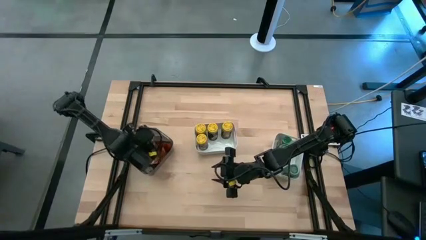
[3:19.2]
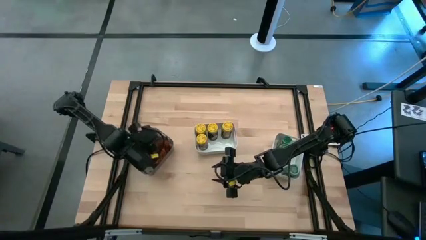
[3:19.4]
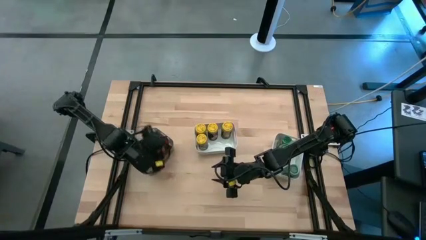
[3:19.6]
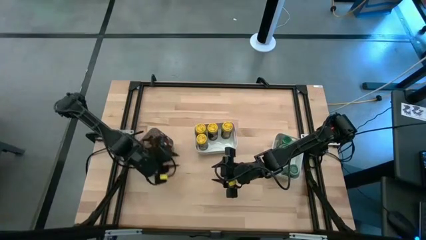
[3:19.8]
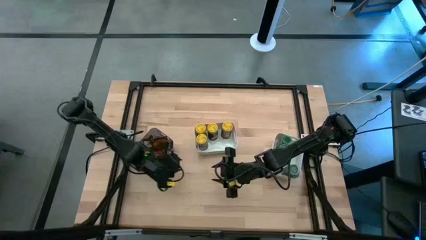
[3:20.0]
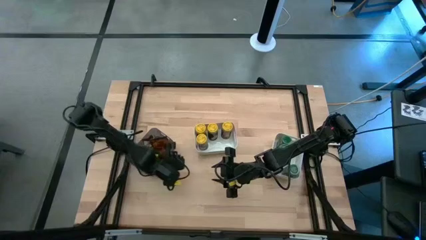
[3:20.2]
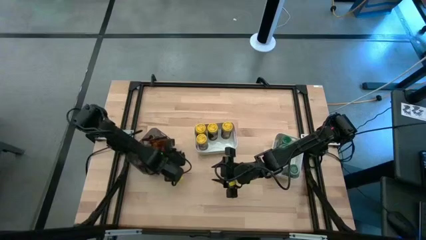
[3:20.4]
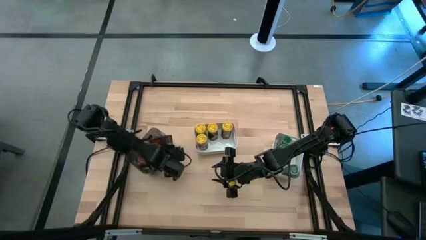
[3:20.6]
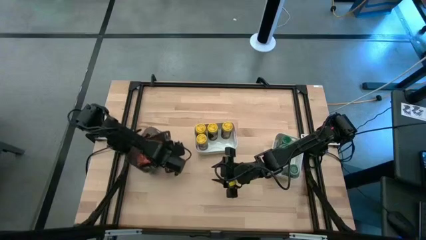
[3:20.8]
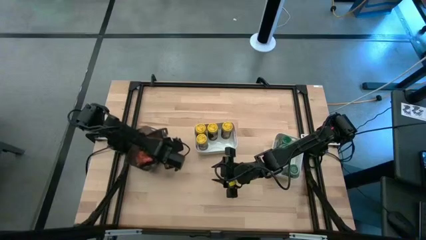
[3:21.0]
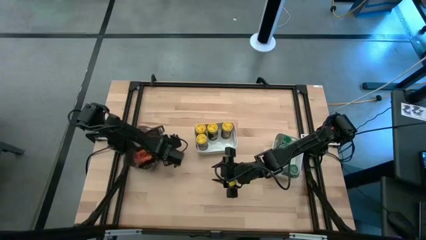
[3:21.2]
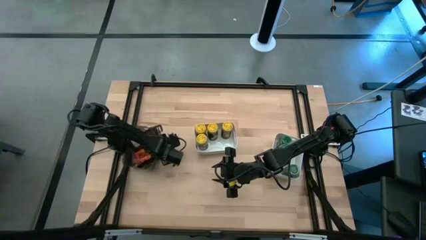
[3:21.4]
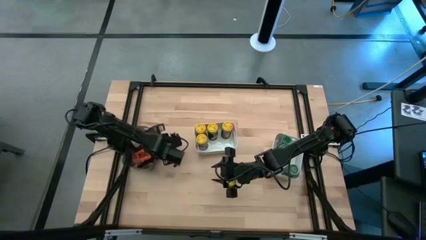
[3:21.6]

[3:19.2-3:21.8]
Task: Sort spices by type
Adjust the black bin

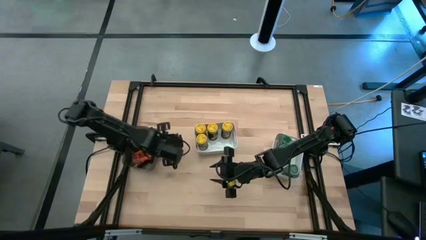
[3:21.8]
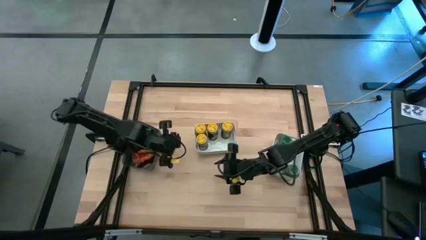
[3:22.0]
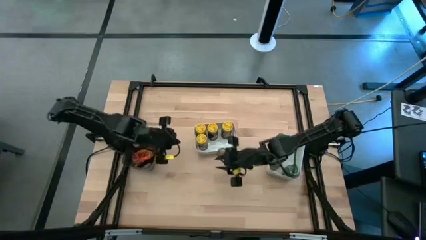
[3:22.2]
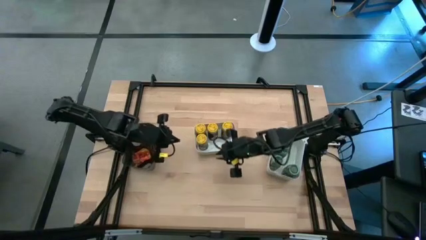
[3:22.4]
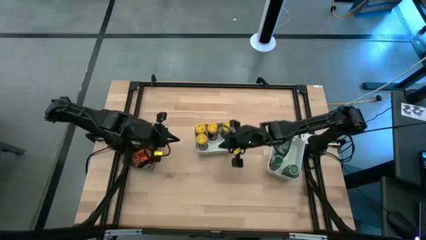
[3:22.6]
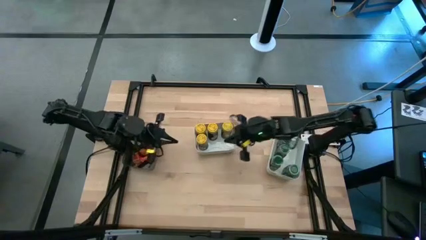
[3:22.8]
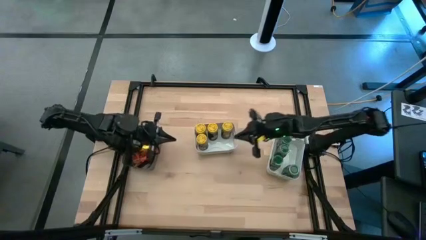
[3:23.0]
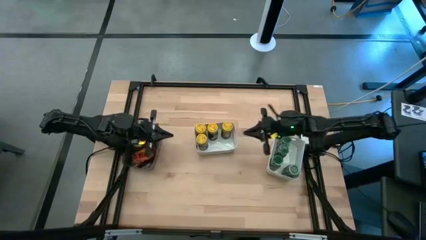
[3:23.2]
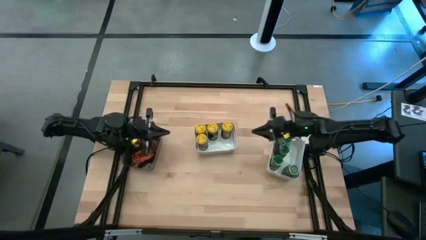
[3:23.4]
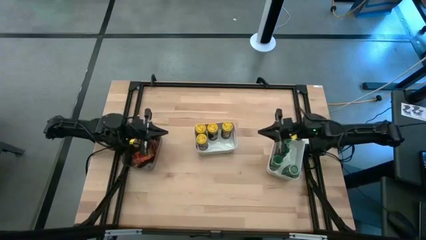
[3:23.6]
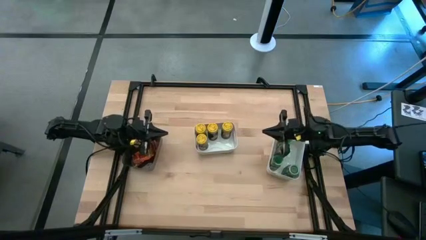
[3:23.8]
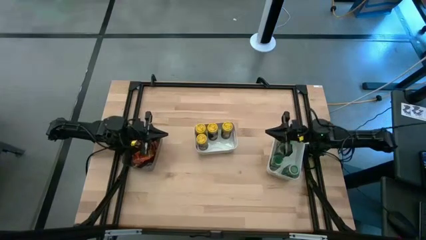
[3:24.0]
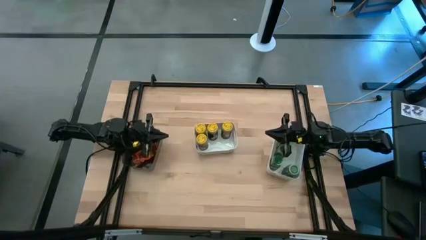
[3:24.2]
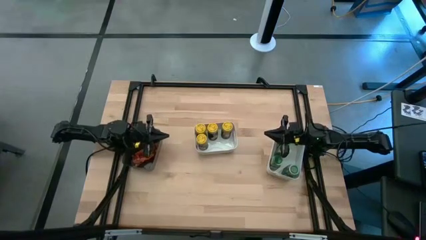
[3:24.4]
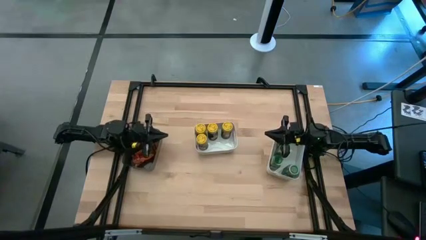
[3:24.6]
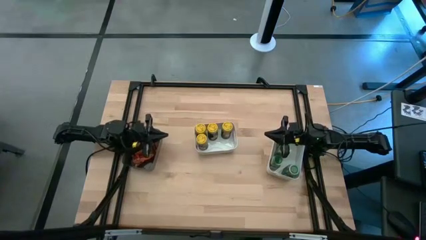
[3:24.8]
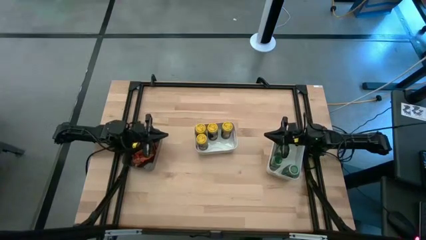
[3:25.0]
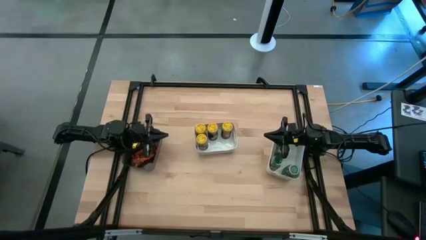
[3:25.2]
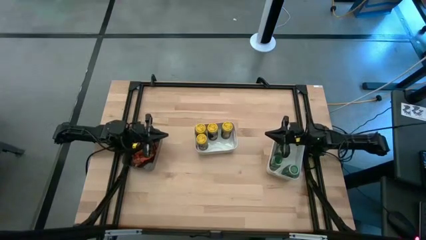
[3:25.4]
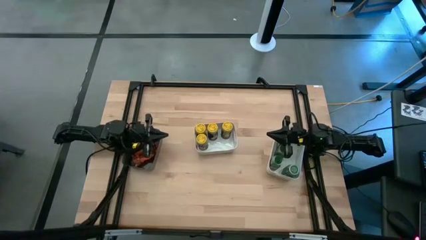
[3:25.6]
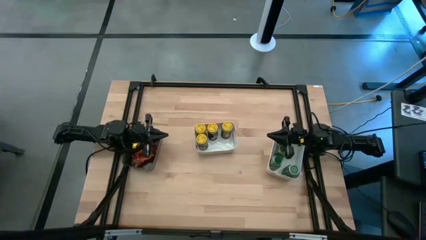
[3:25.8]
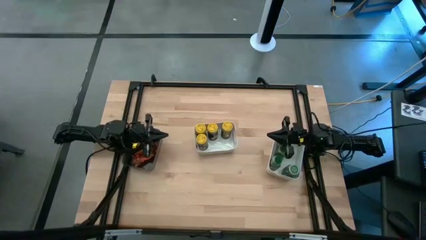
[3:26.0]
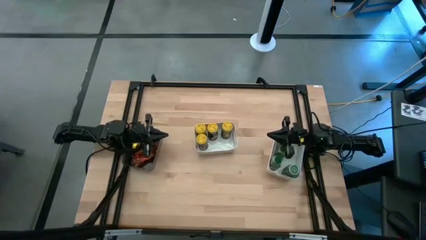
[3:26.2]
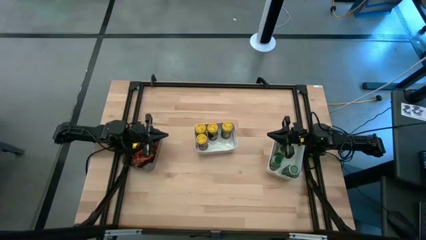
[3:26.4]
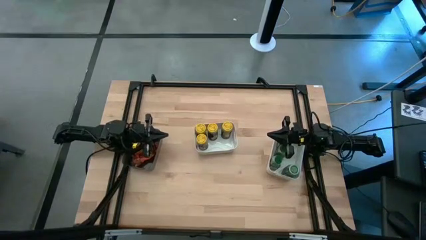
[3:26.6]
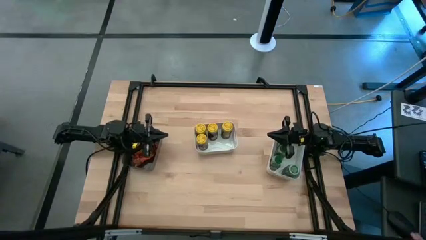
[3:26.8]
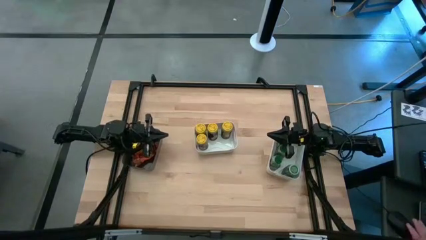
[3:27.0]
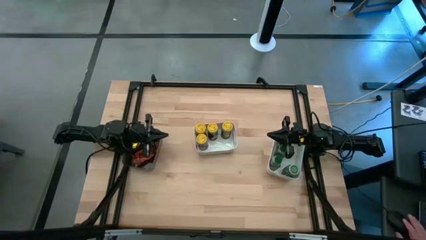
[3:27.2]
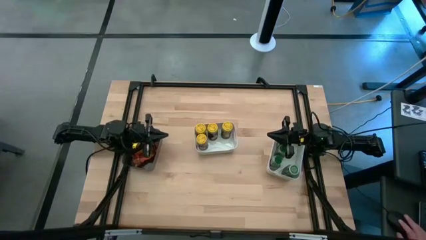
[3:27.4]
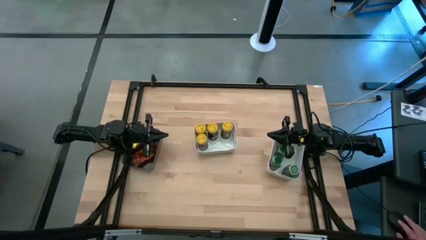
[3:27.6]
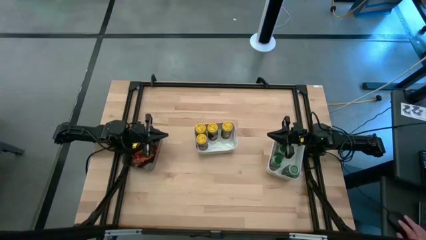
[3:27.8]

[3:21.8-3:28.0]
Return to Home Position

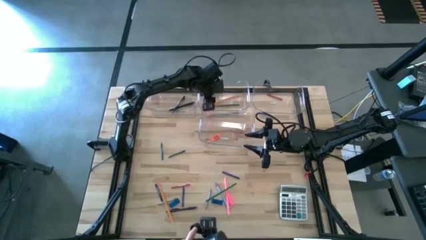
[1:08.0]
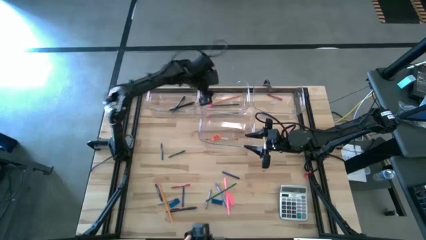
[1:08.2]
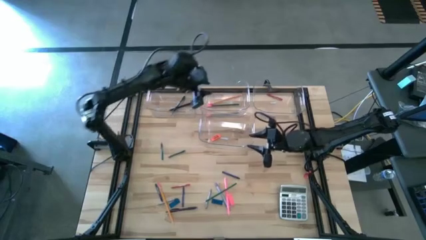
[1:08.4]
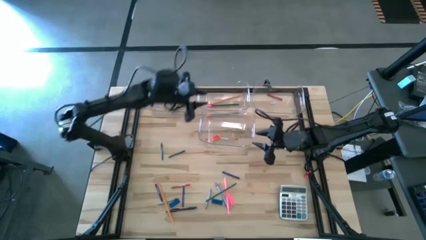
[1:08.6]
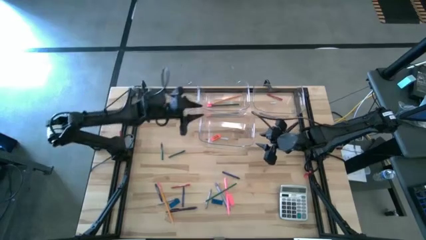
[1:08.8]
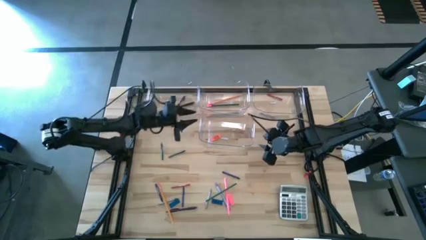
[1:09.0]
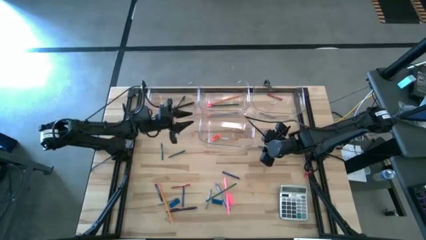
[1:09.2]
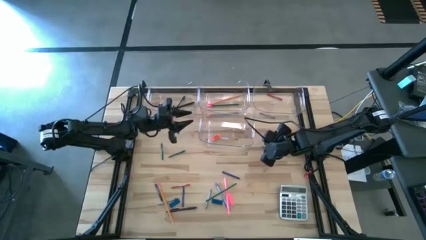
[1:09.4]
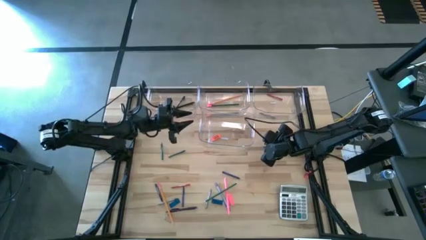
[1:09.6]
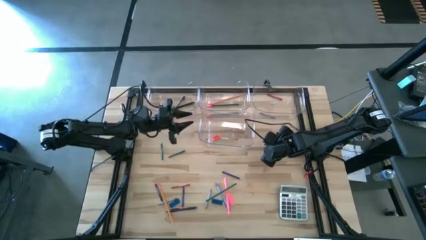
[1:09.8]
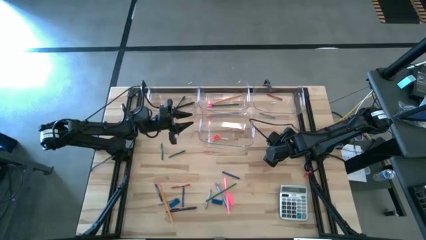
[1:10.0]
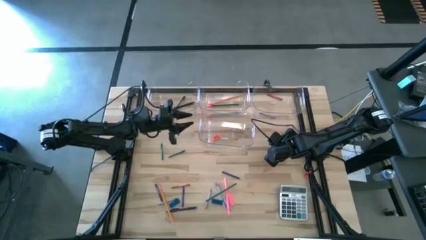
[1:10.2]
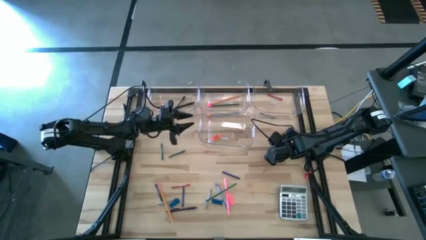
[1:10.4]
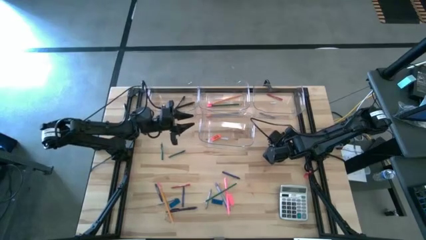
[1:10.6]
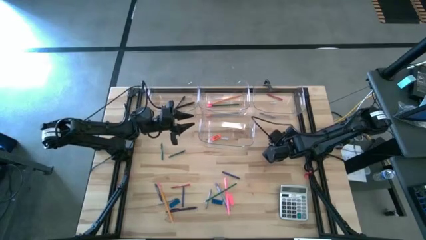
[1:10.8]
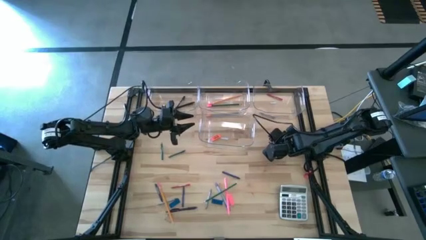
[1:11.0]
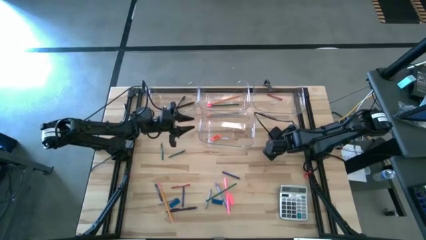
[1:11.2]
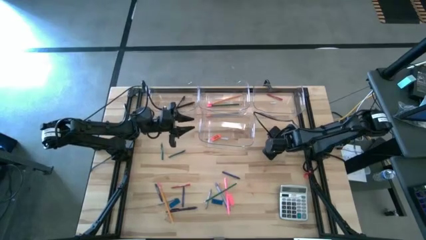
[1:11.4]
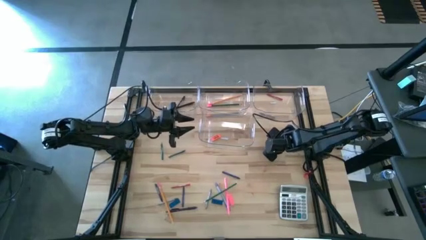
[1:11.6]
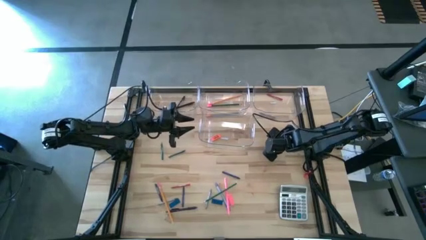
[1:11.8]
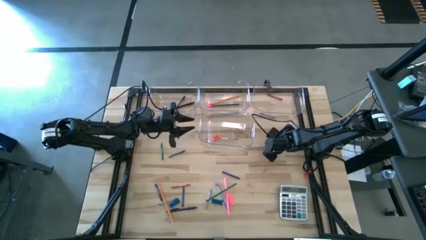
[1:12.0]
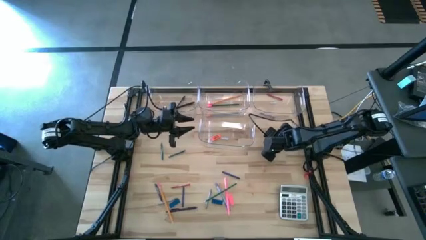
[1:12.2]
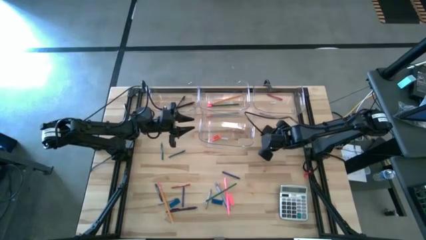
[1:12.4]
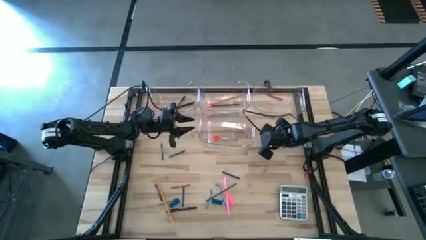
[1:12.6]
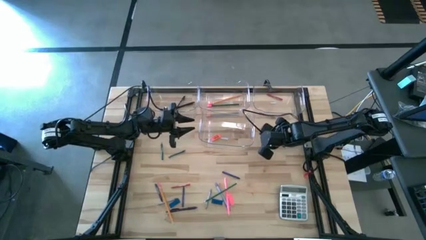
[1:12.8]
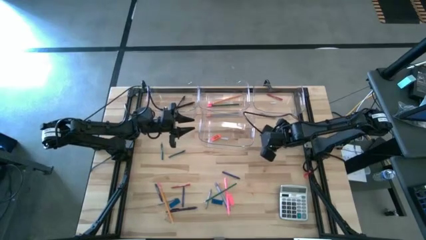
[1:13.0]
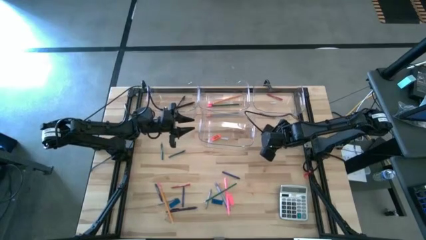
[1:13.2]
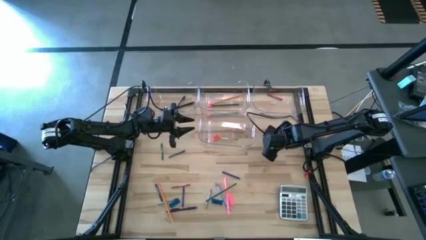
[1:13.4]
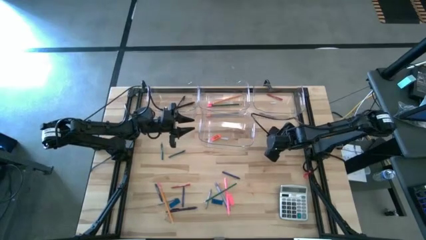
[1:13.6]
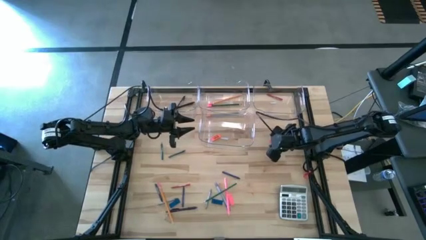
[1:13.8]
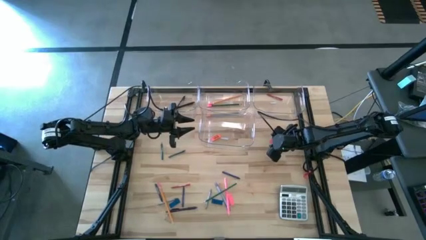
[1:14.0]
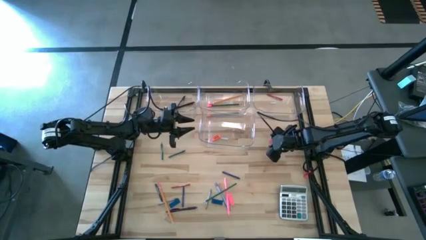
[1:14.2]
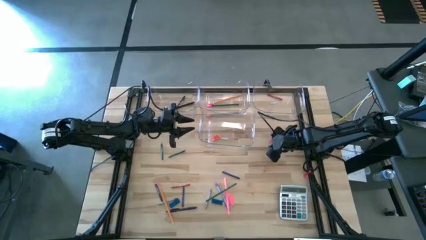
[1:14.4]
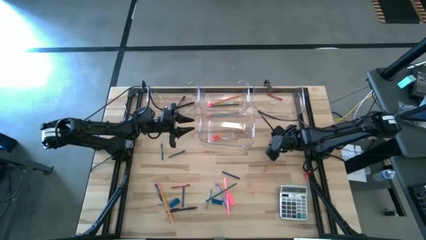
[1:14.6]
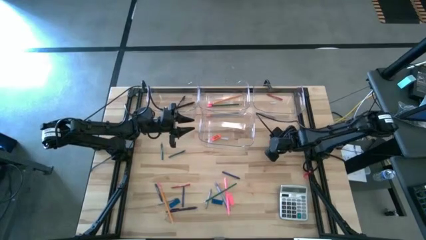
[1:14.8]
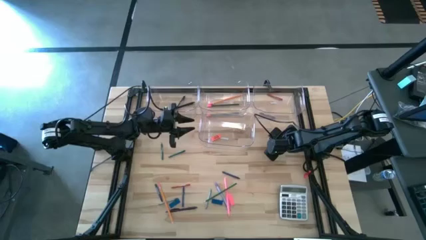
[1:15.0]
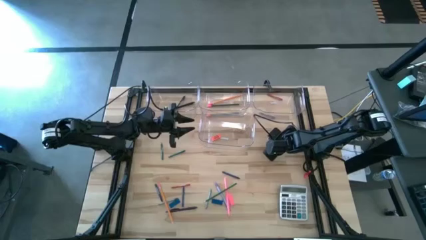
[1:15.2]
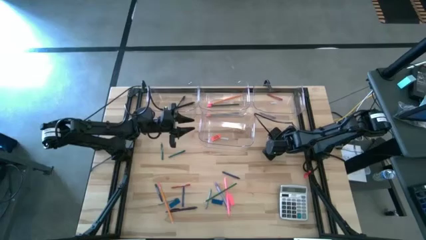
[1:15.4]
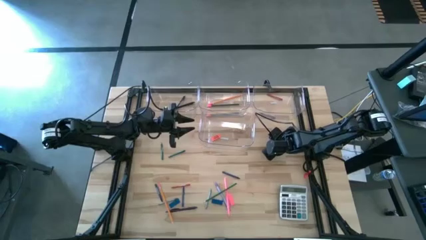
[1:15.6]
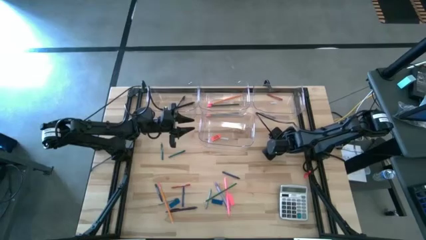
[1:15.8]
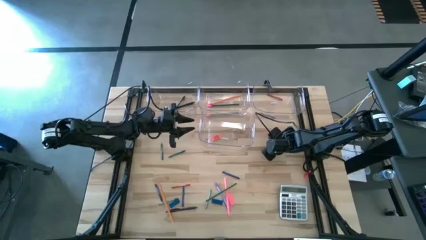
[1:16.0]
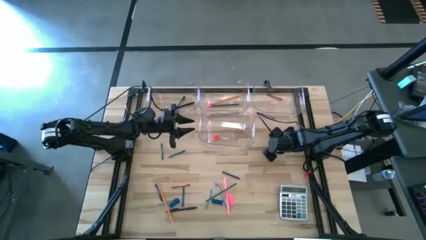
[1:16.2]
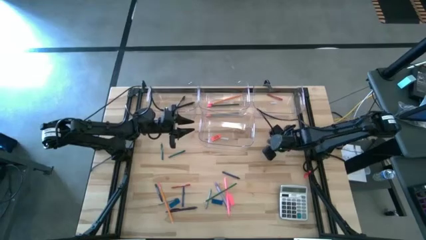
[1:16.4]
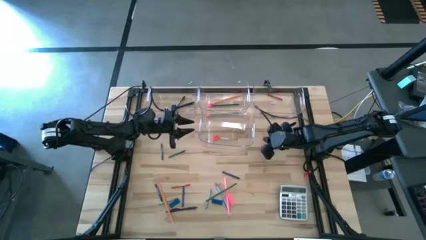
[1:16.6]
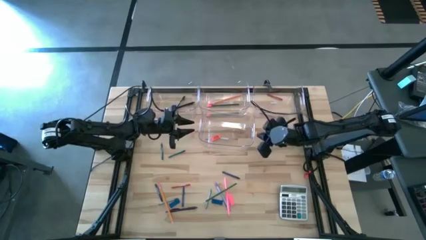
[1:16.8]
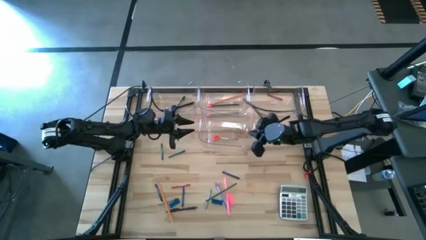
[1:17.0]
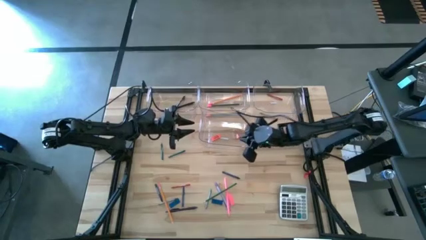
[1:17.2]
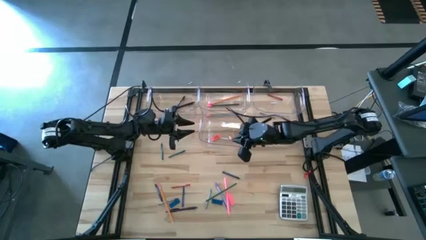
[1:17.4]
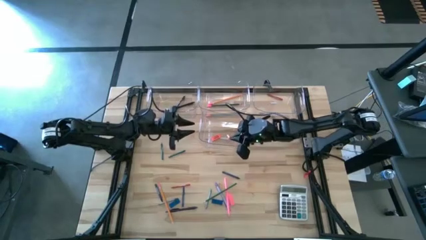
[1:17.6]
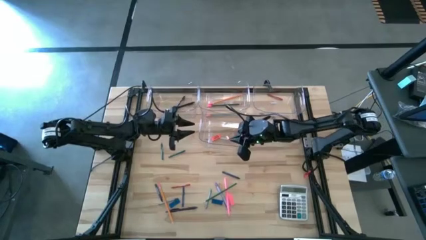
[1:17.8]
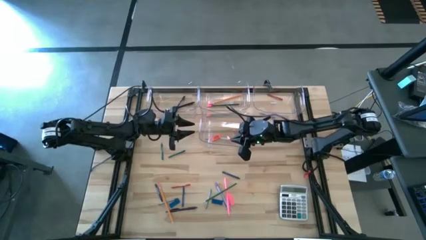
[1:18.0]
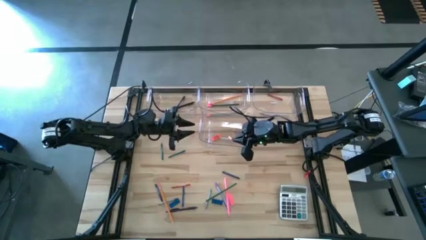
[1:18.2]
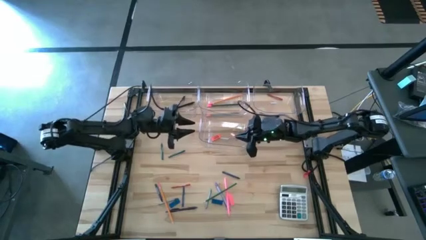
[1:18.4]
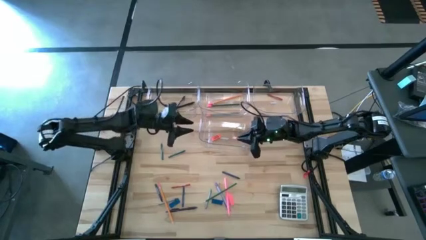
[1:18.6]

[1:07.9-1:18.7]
Task: Sort crayons/erasers/pens/pencils in bins
Put the orange eraser into the bottom transparent bin
